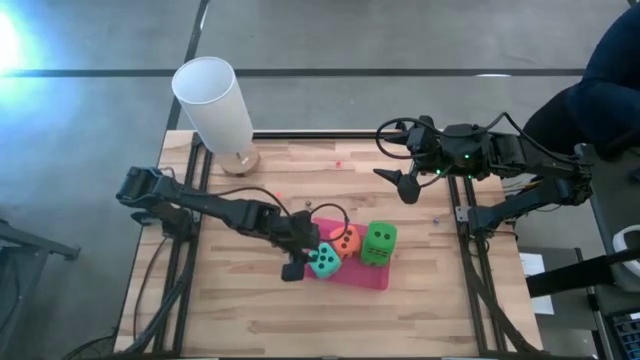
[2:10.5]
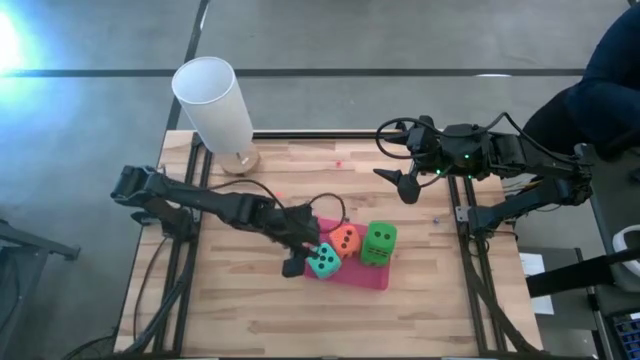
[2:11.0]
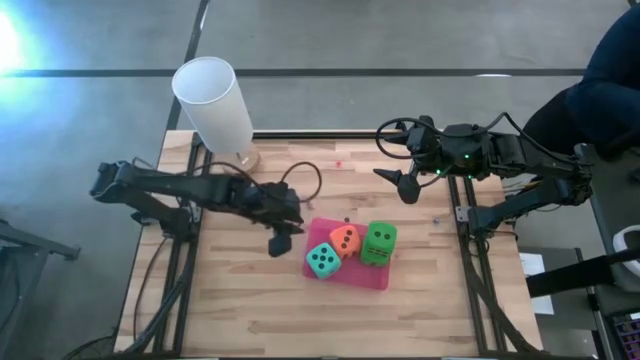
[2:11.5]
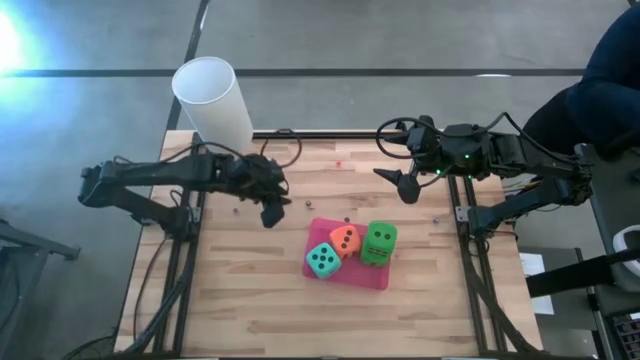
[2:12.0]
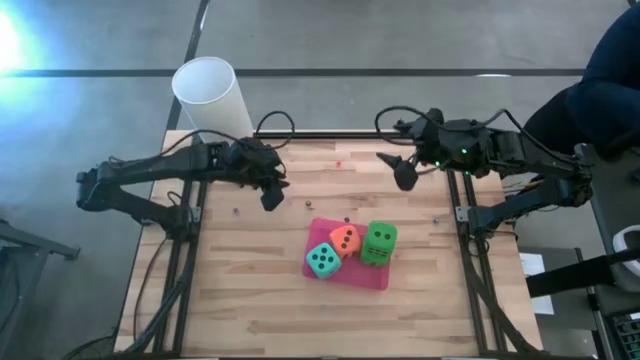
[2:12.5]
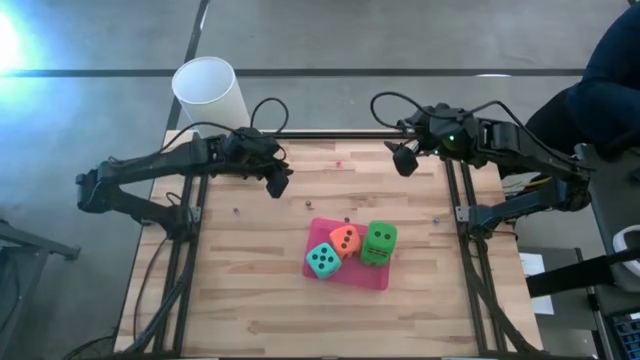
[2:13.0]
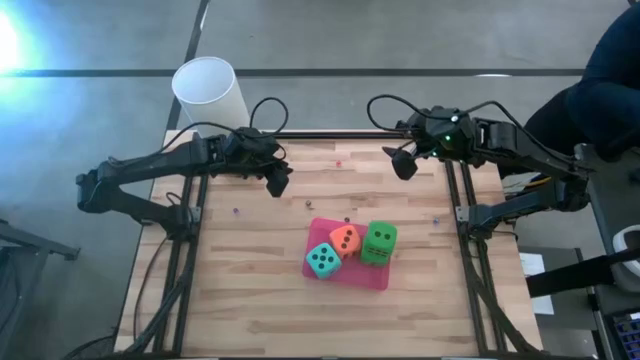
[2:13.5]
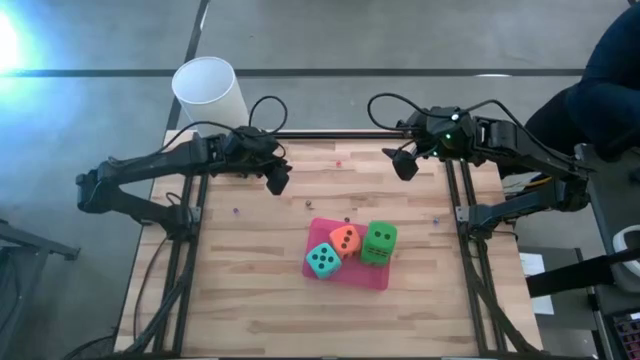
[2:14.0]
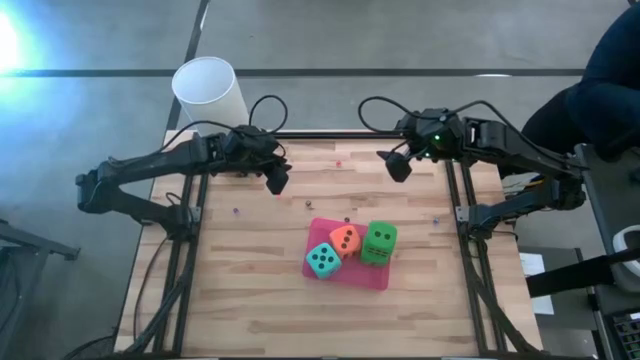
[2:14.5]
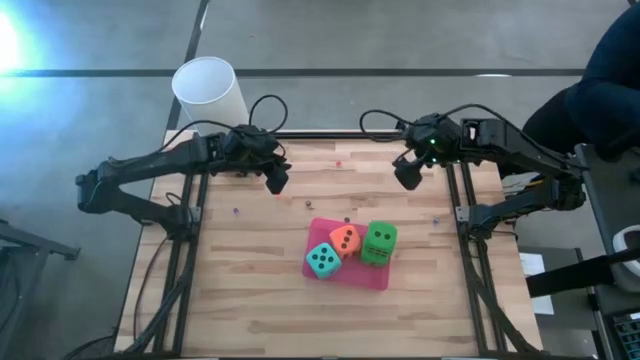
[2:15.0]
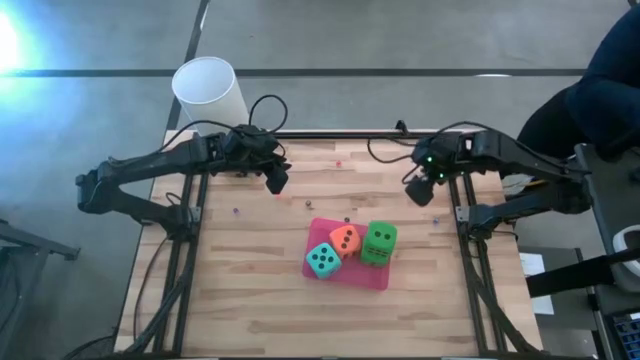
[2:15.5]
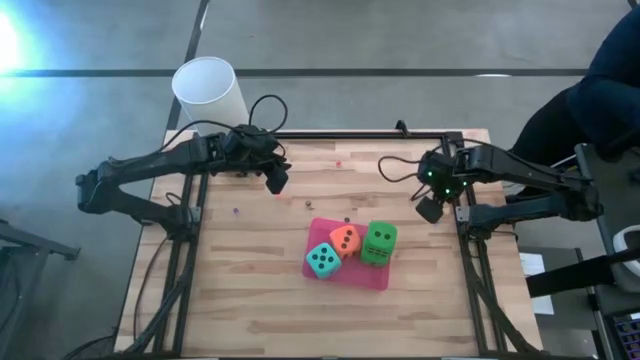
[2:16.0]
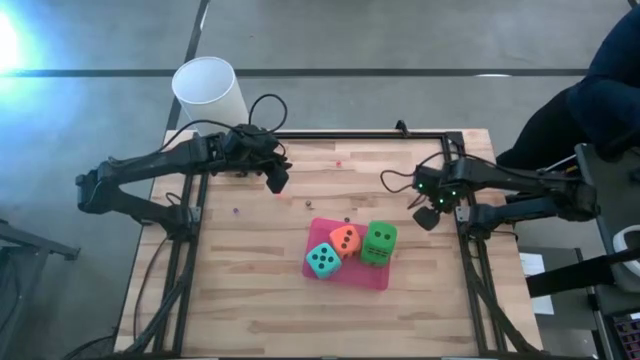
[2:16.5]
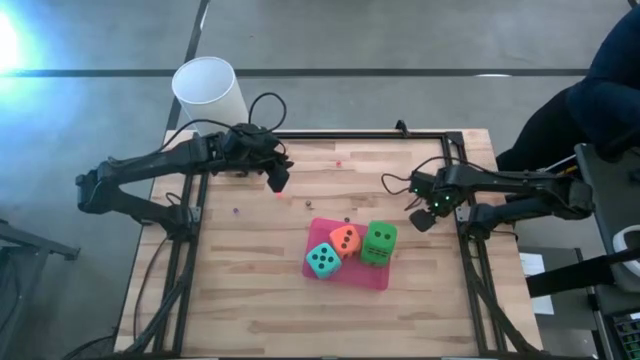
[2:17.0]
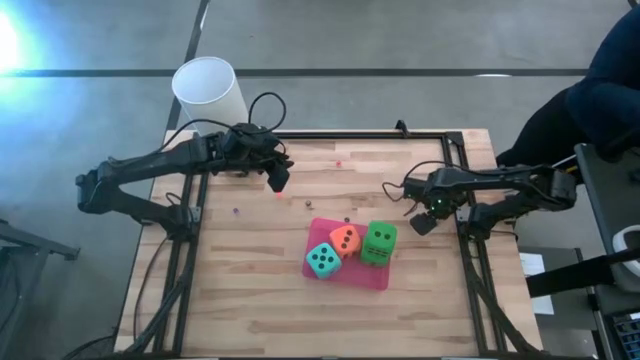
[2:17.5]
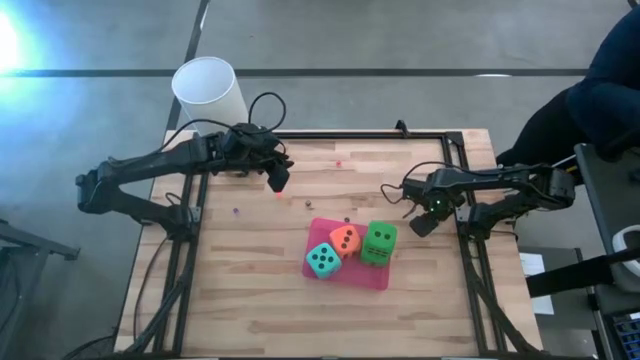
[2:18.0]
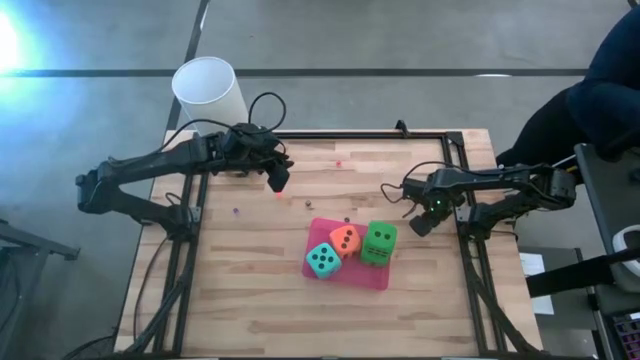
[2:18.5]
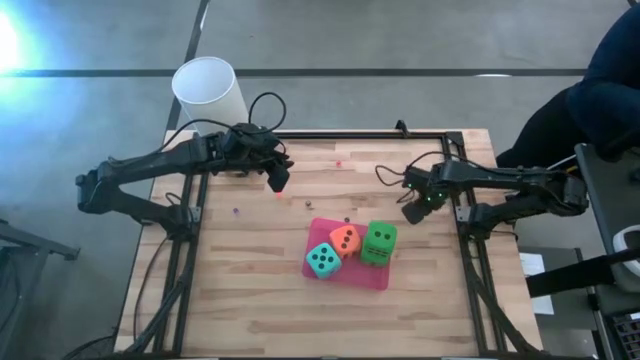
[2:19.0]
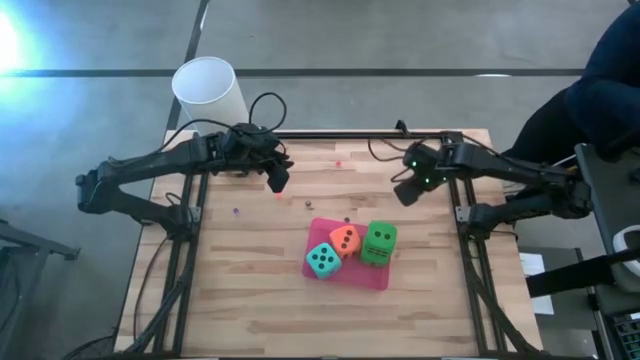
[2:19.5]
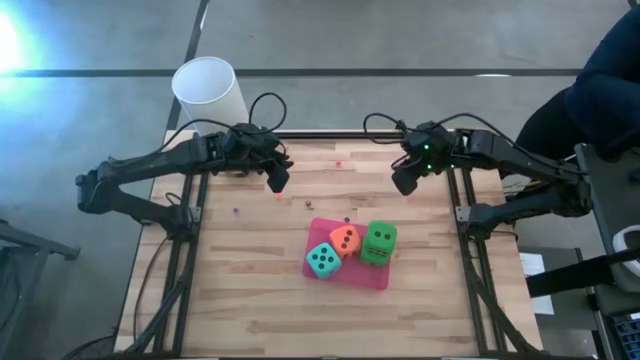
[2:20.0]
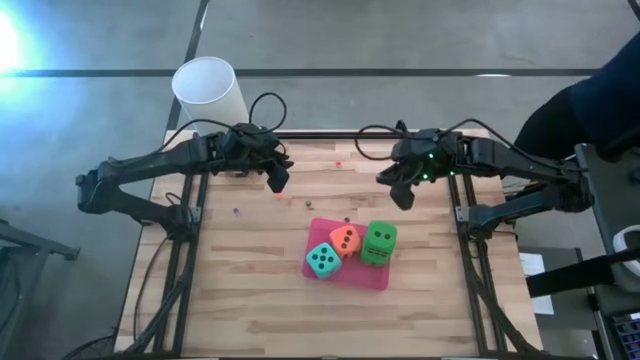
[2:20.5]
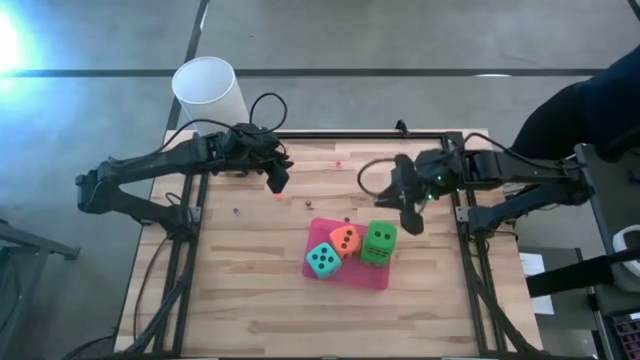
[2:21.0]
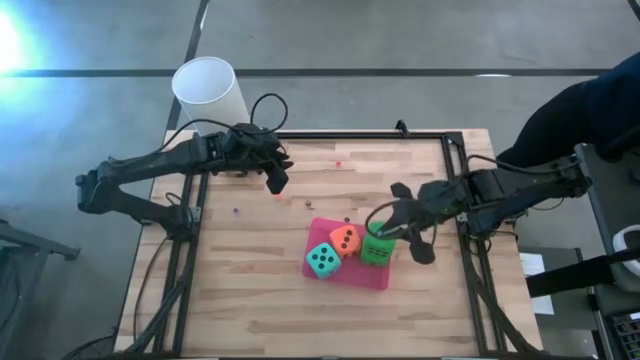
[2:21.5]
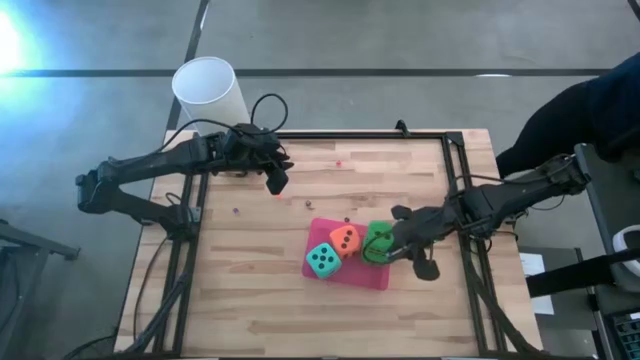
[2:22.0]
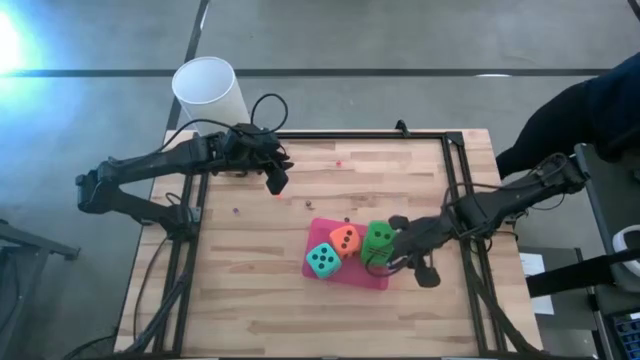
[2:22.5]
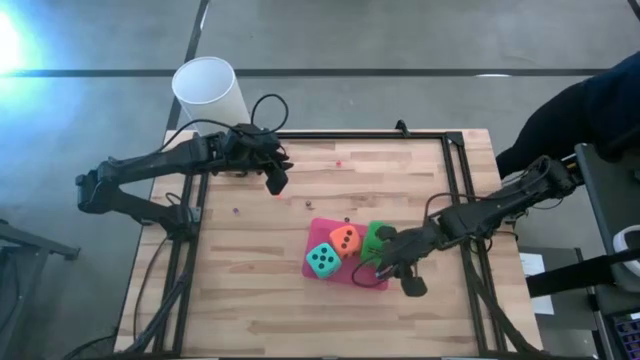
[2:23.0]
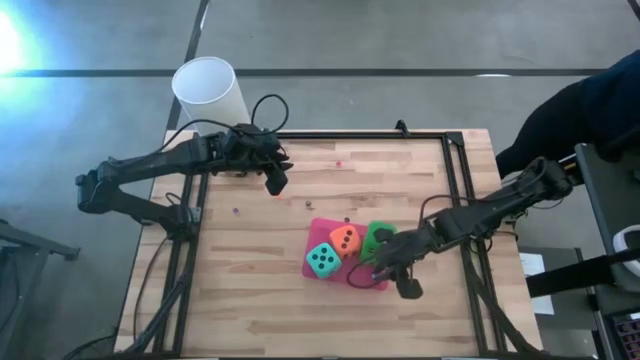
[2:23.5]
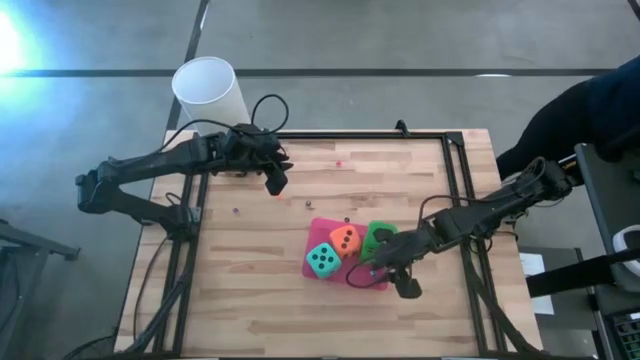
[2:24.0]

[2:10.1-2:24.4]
Task: Pick & Place Dice
Put the small blue dice into the pink bin

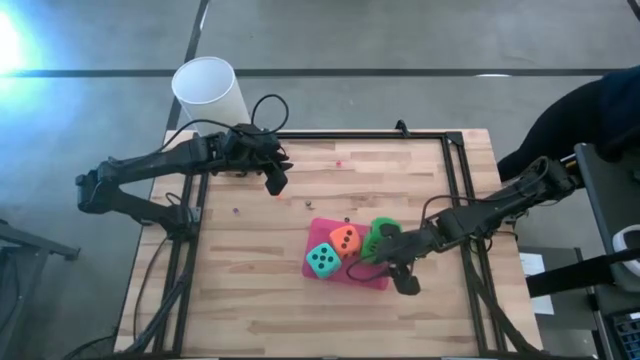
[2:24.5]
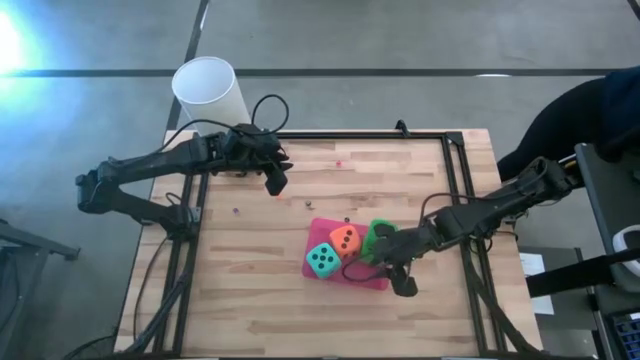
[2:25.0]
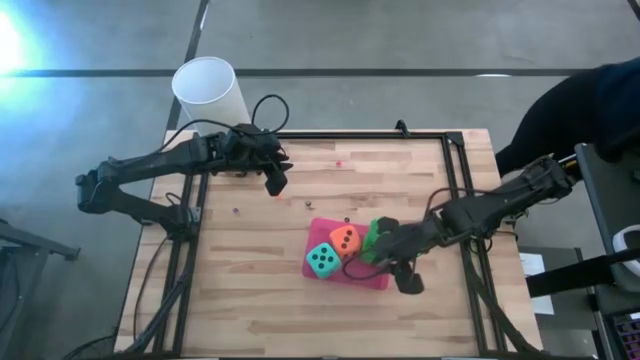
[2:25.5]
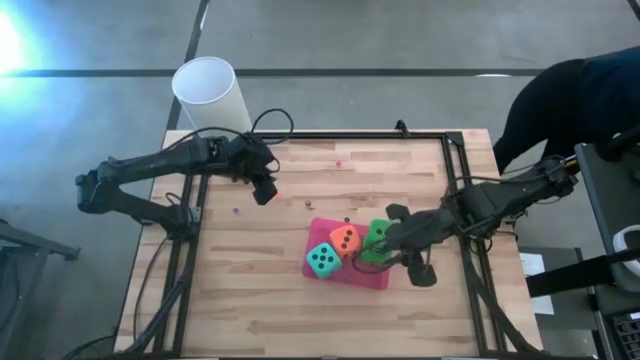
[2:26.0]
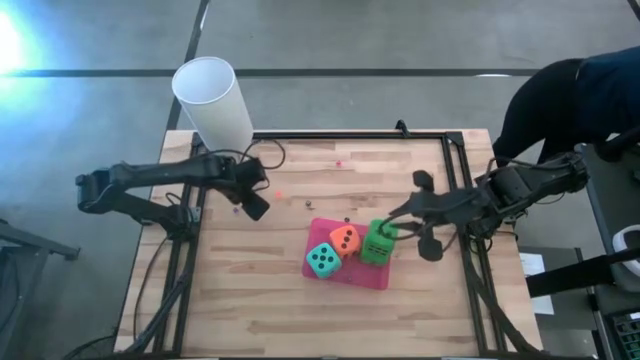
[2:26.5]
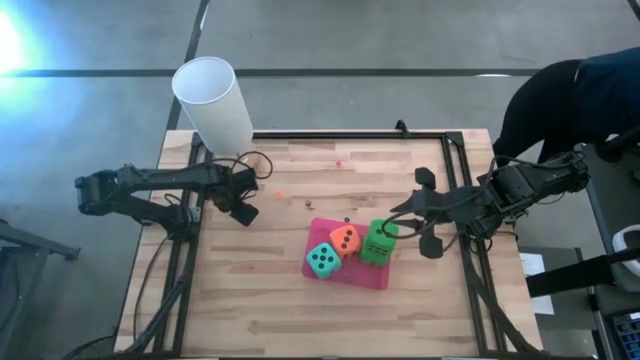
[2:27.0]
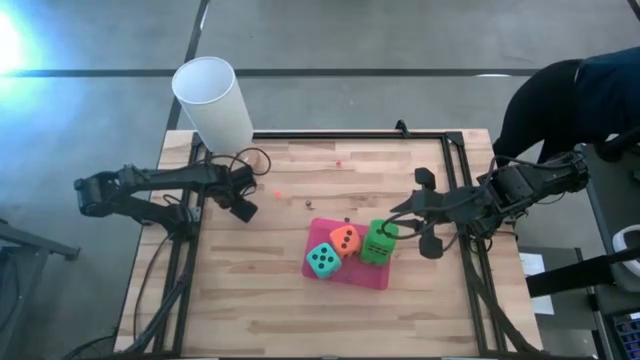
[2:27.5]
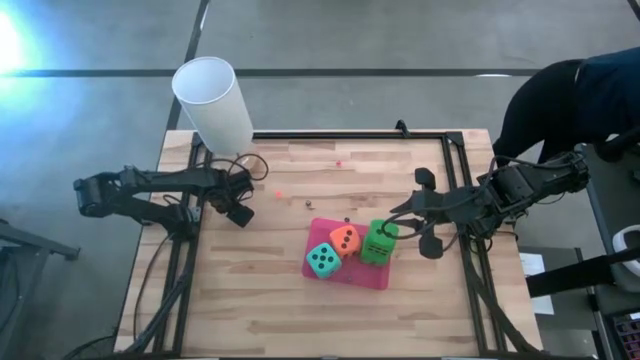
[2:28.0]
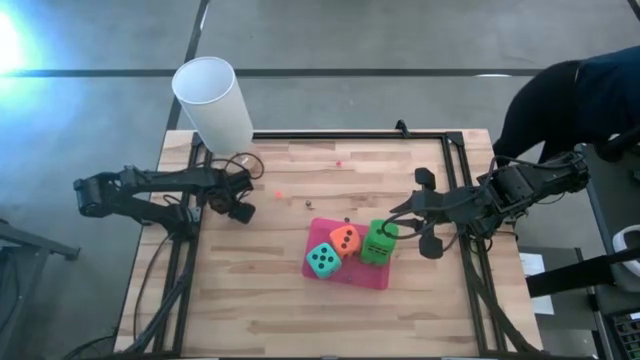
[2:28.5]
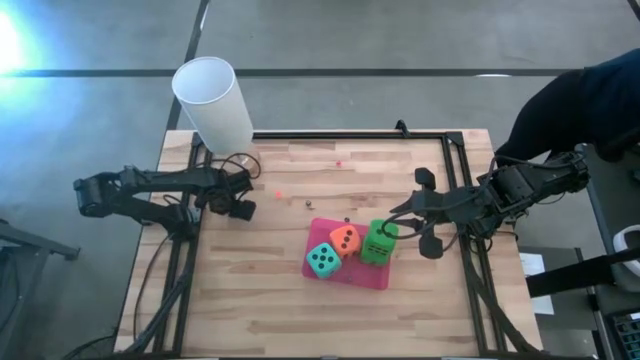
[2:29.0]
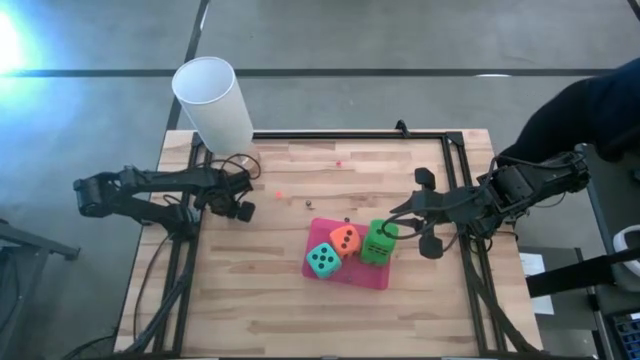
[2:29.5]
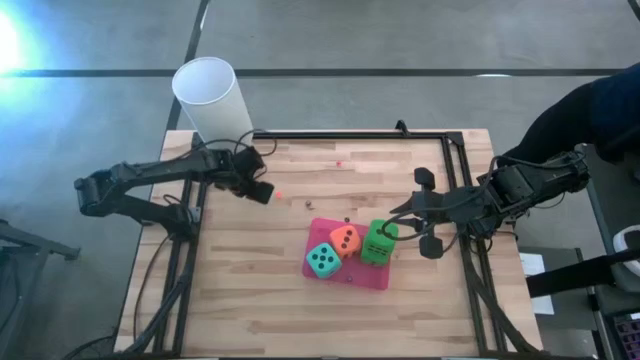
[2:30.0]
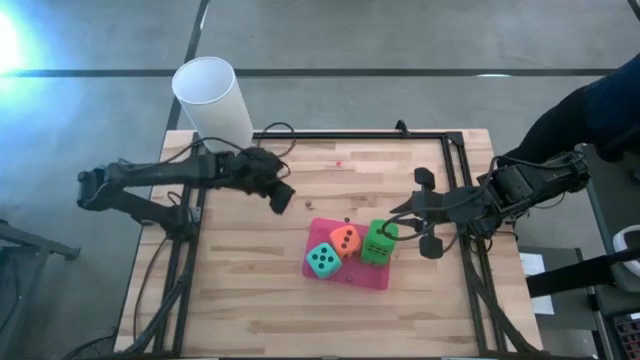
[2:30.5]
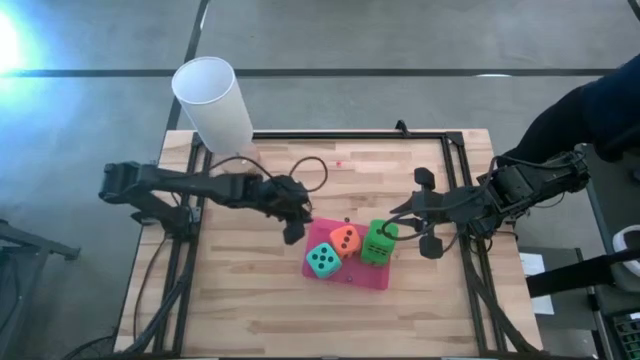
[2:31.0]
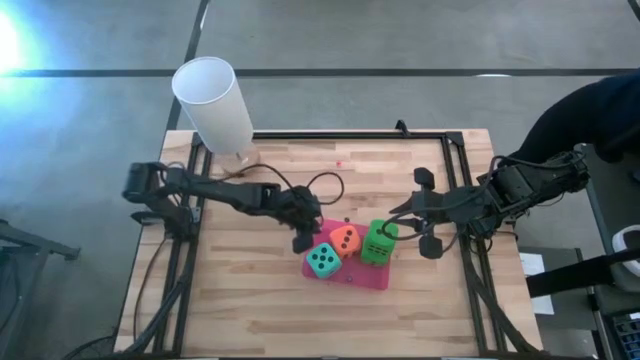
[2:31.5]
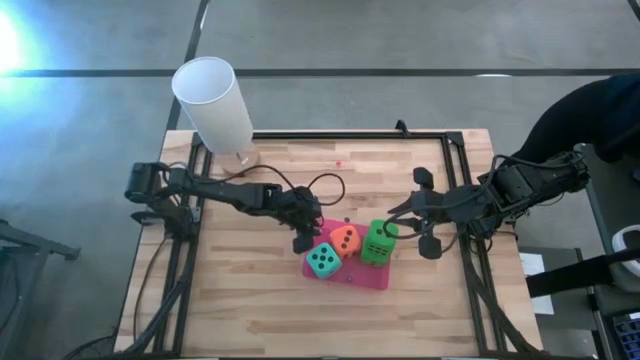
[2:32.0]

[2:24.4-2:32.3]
Put the small violet dice into the pink bin
